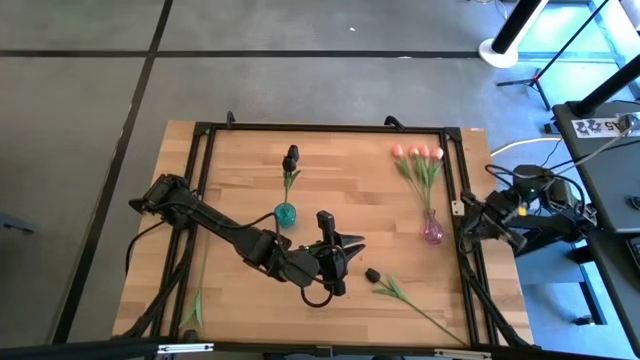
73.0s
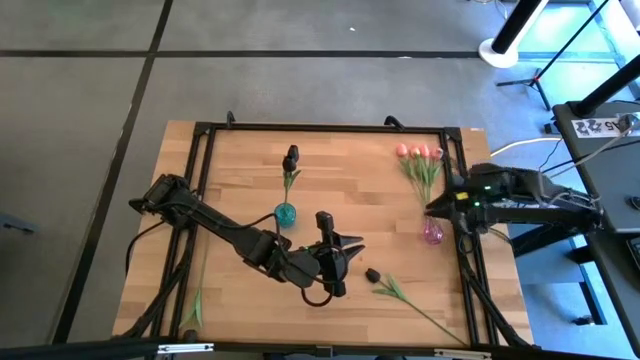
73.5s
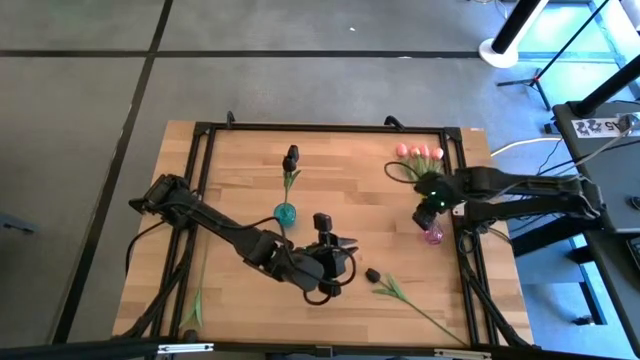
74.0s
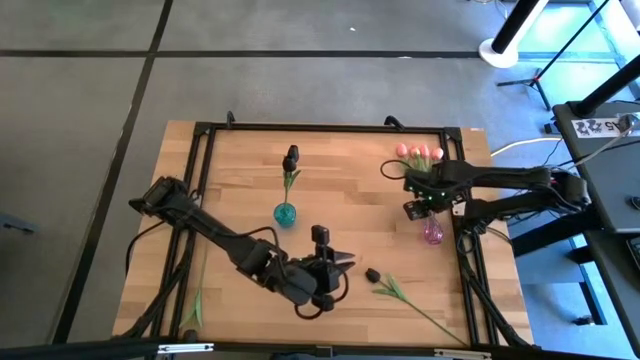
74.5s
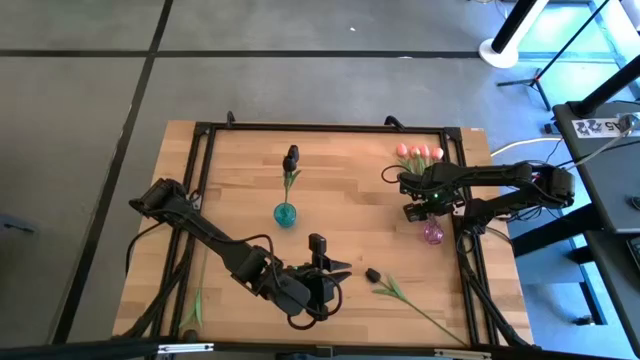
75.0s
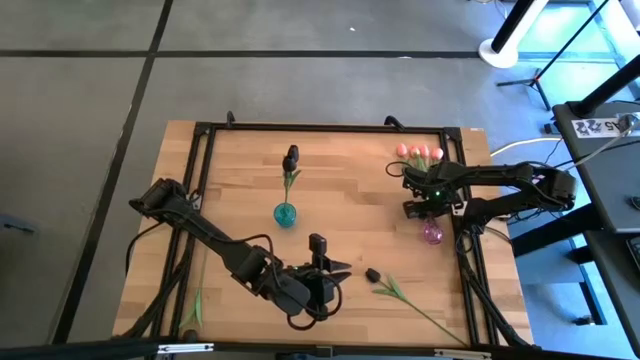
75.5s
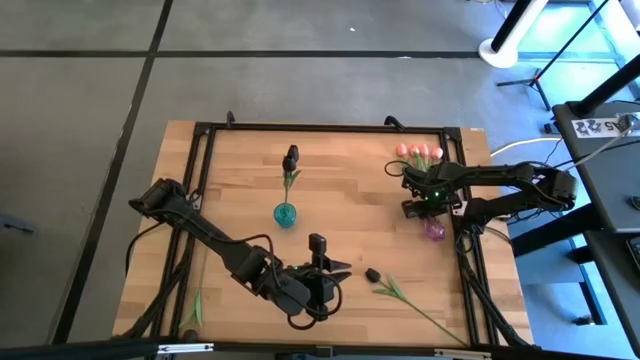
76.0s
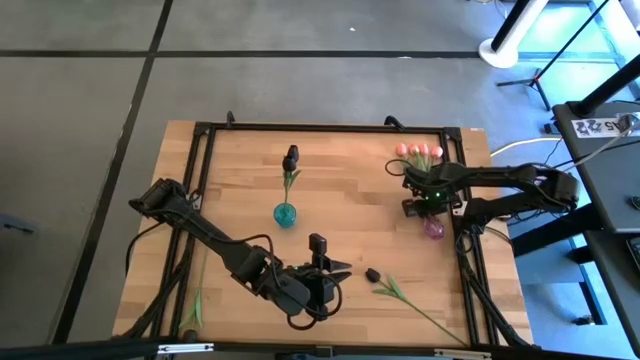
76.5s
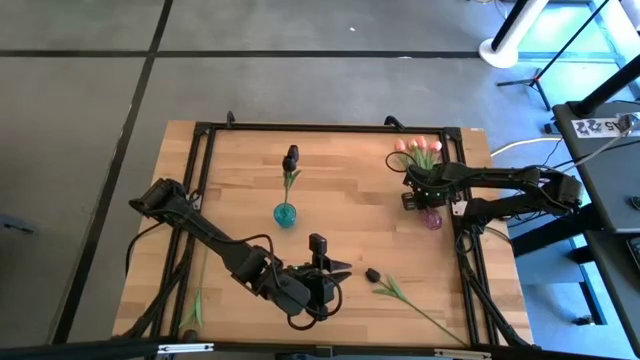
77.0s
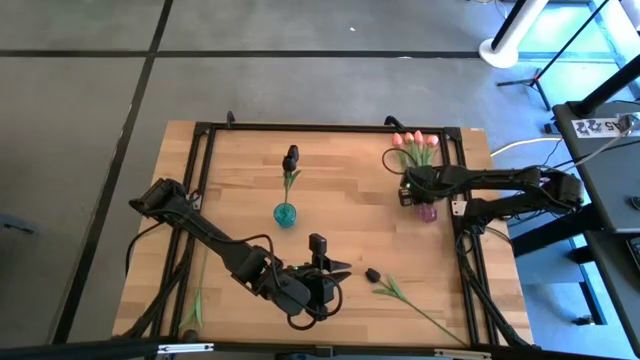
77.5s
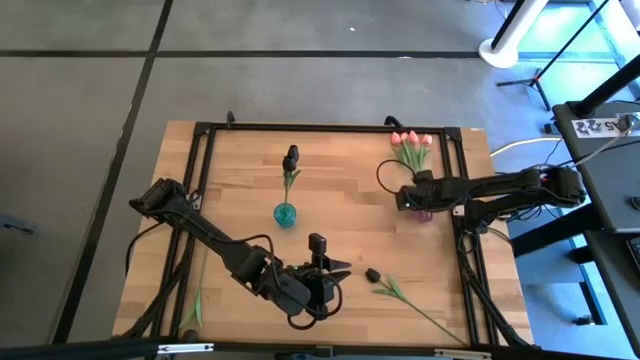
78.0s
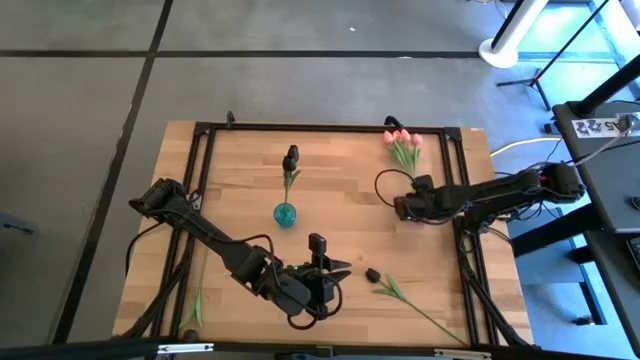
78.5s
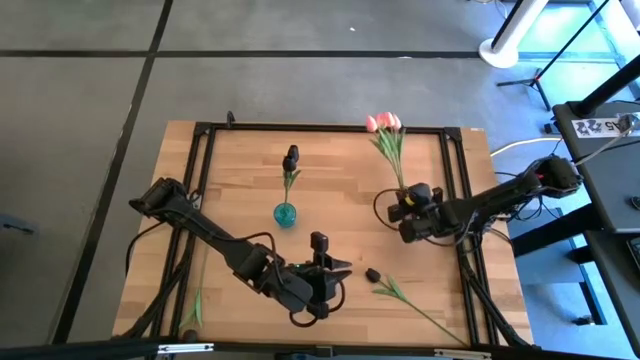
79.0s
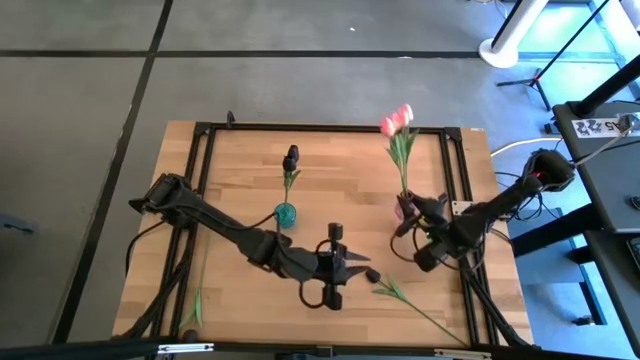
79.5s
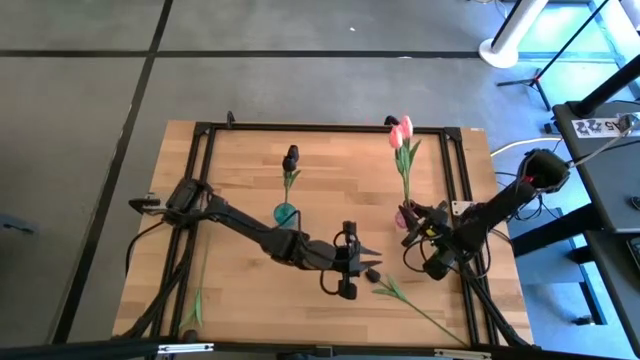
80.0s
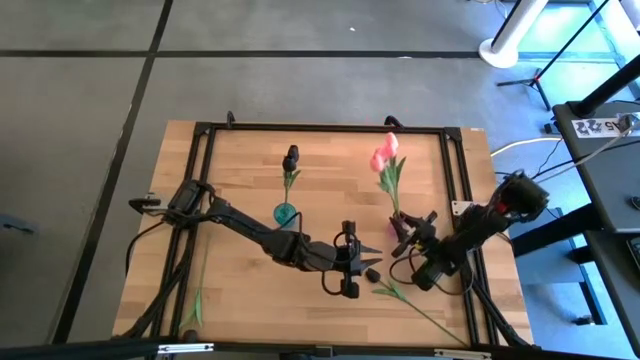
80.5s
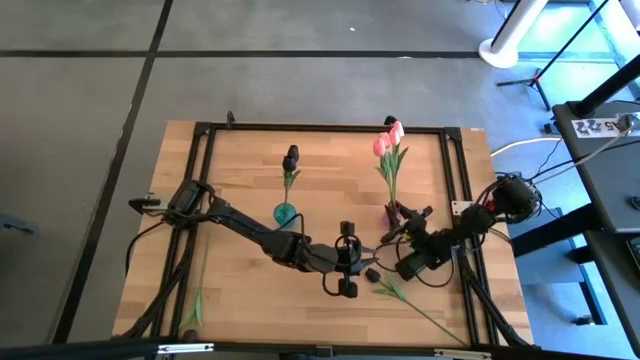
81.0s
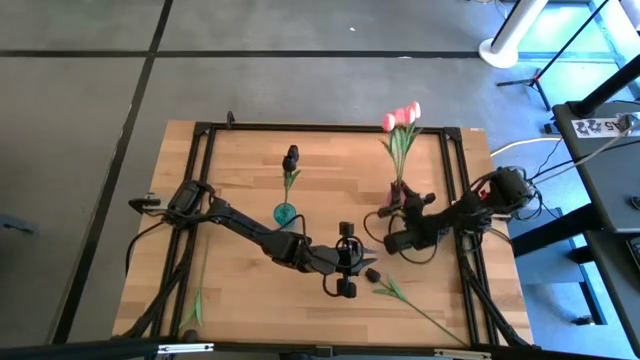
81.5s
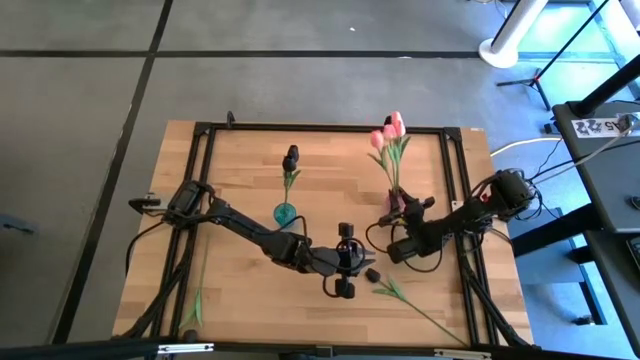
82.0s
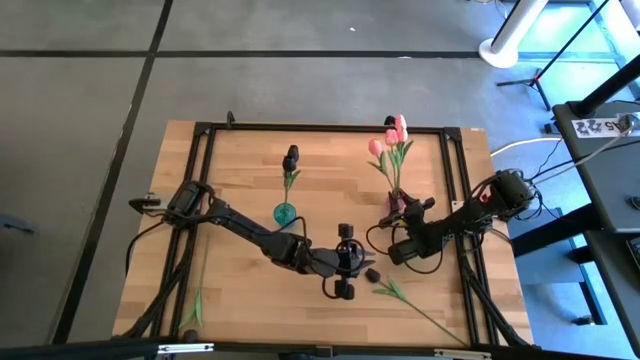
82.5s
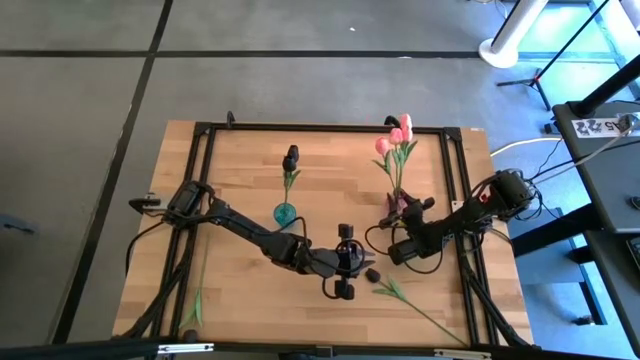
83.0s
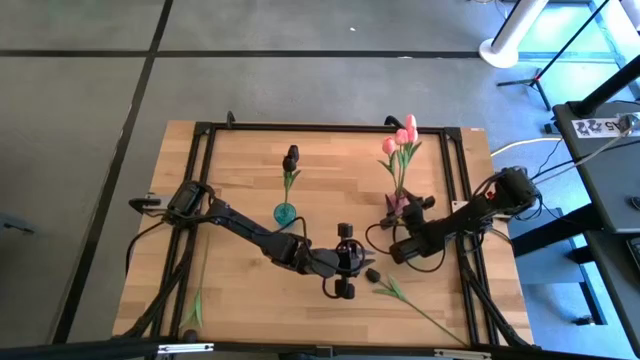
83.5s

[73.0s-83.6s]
Task: Sort flowers into vase by color
Adjust the purple vase

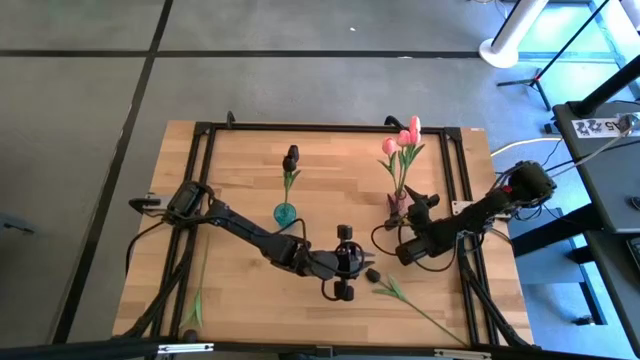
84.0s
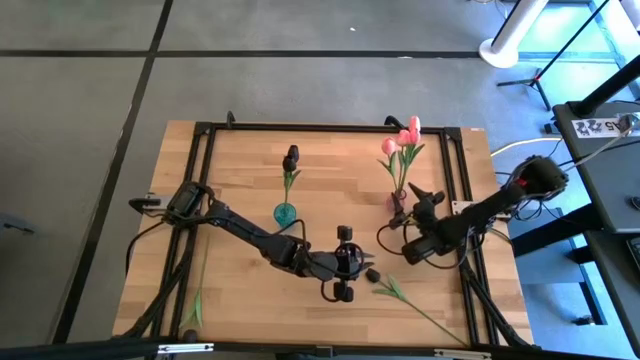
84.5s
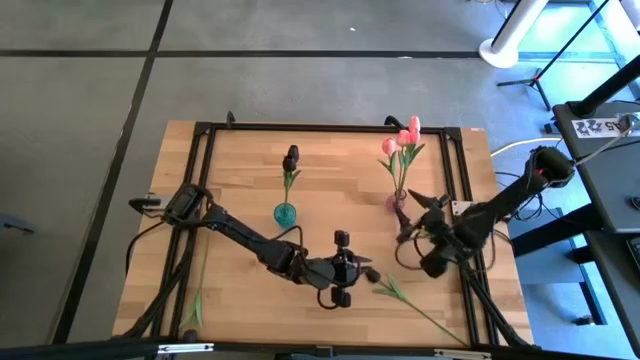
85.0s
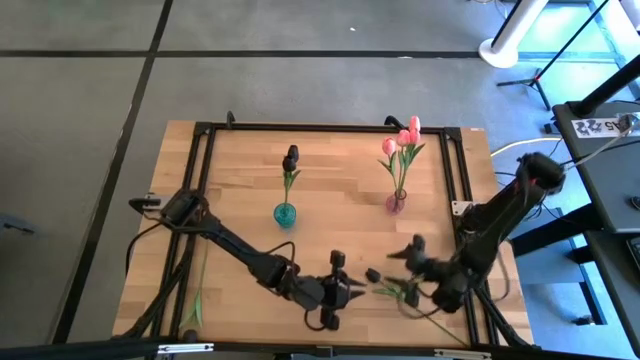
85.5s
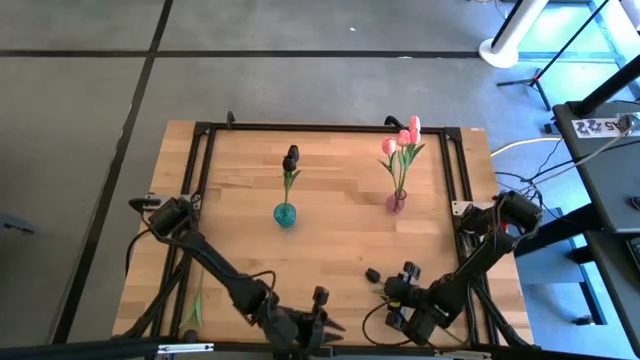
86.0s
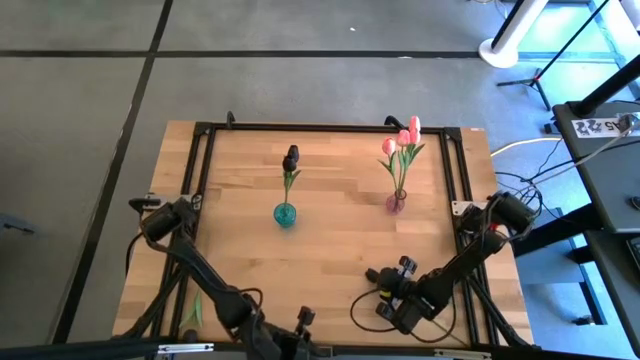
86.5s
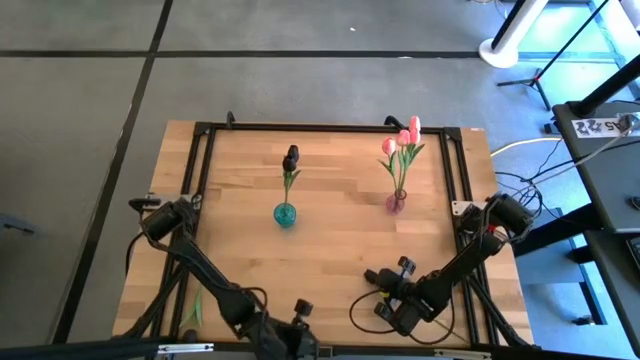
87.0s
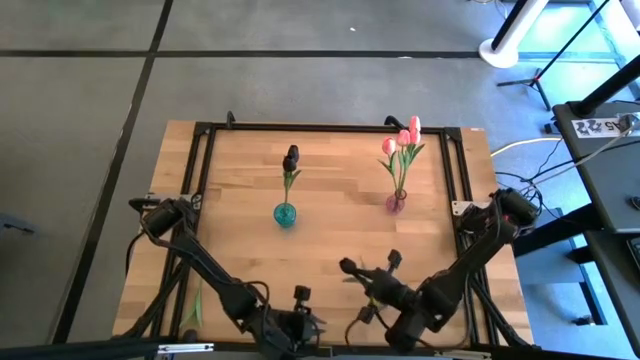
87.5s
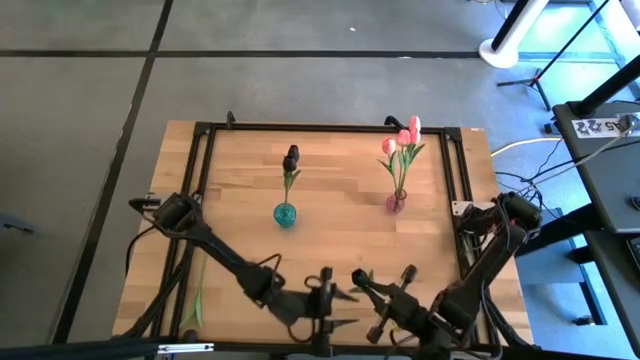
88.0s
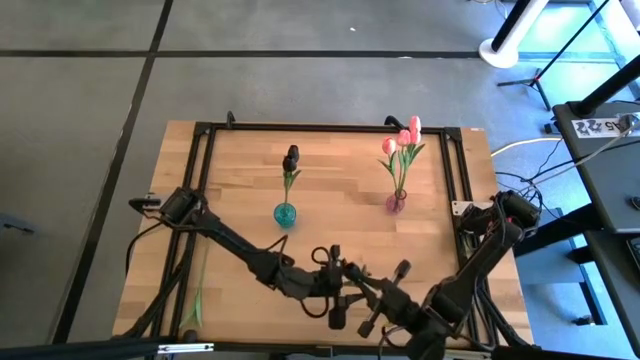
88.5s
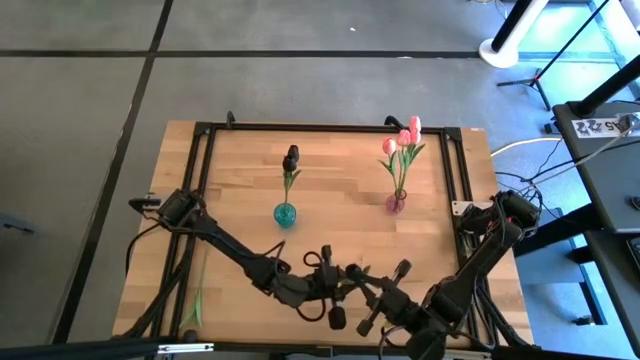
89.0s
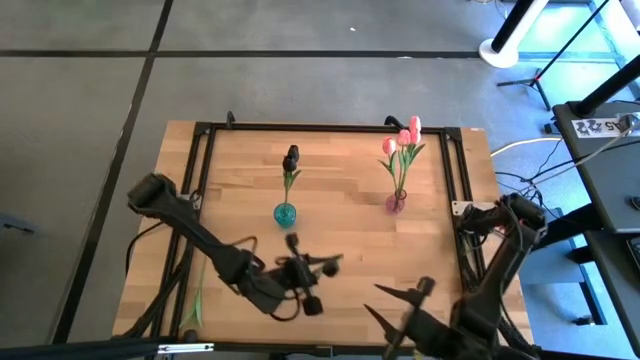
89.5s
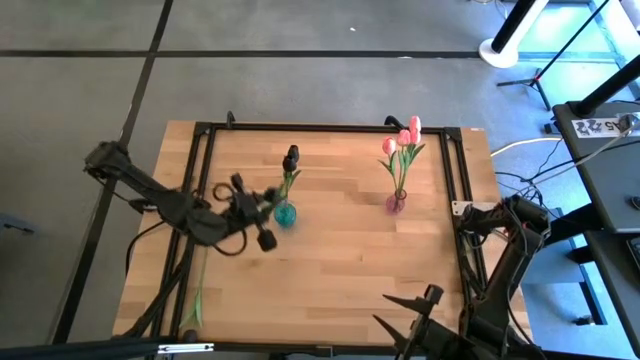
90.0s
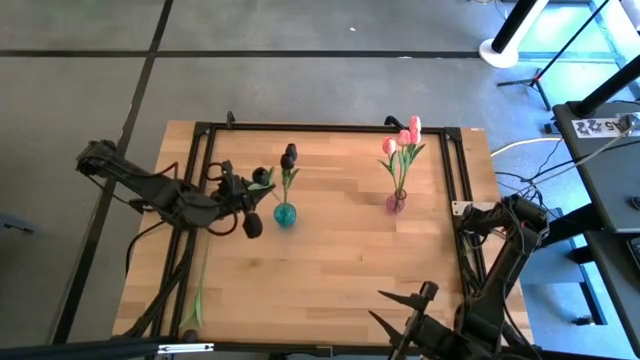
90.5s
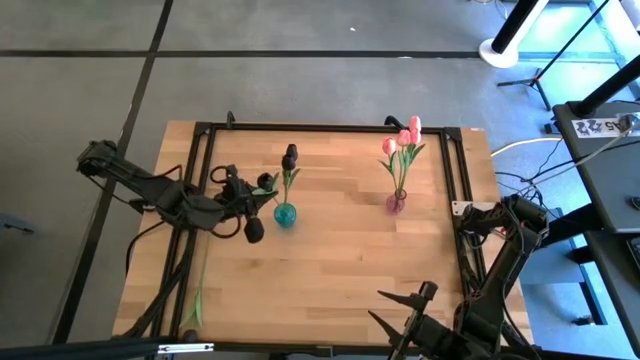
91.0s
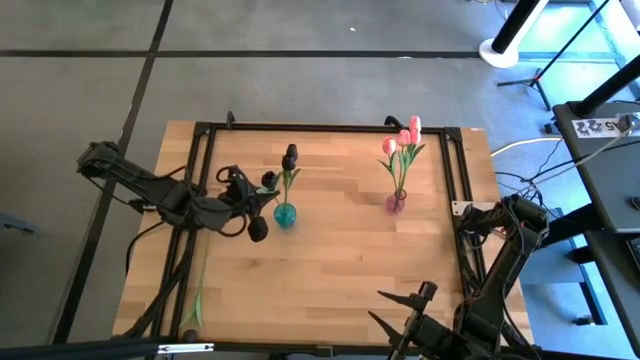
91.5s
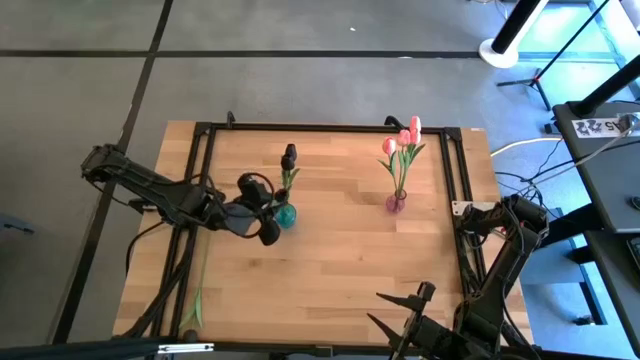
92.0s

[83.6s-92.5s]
Put the black tulip into the blue vase
